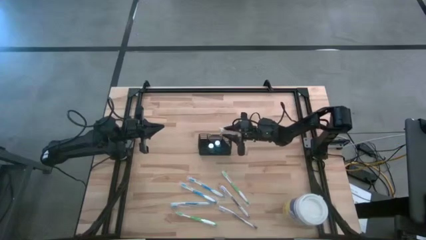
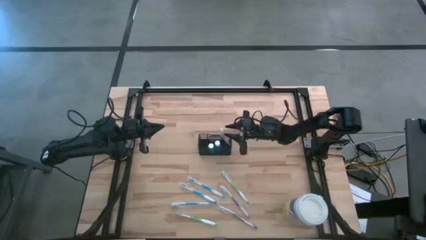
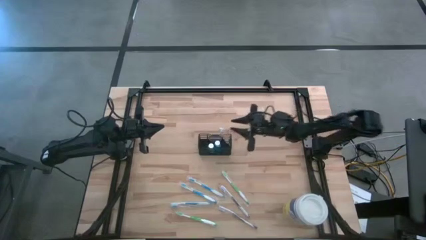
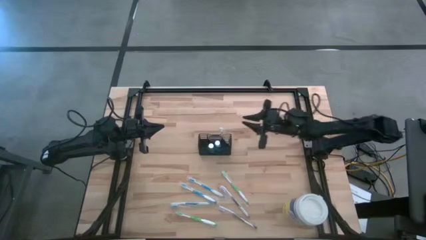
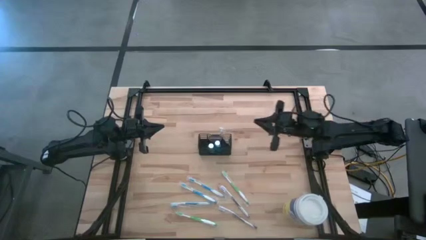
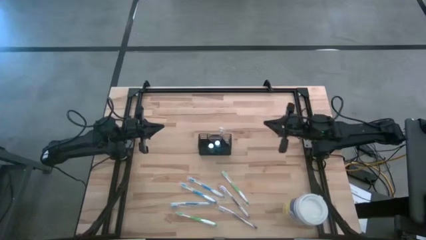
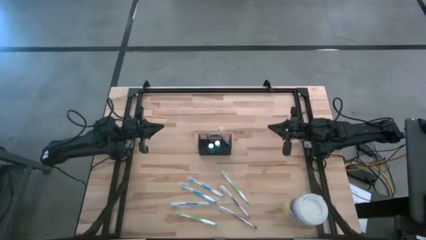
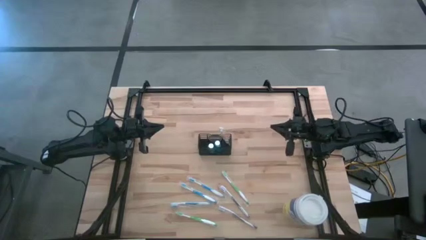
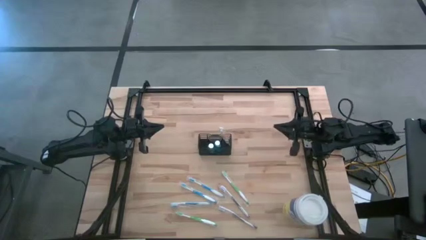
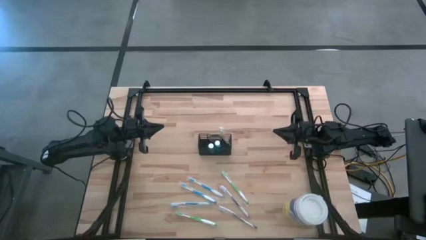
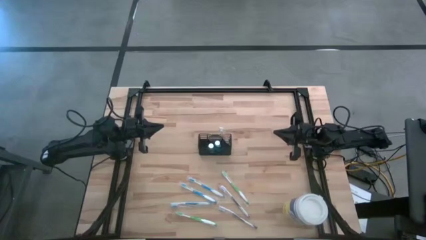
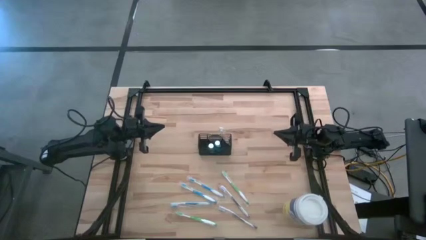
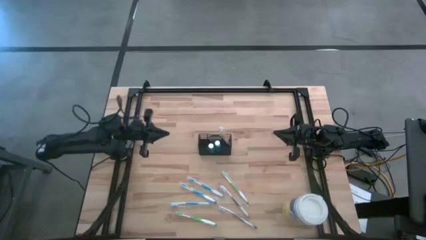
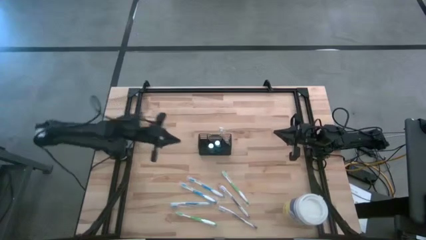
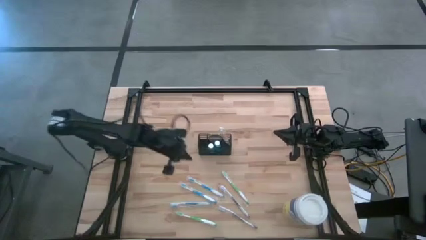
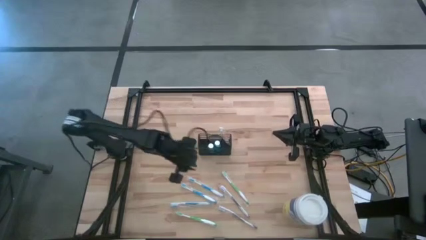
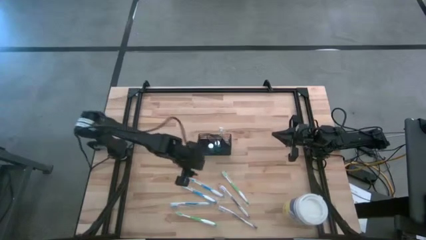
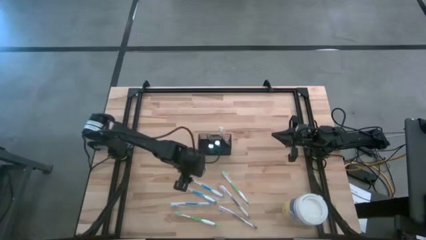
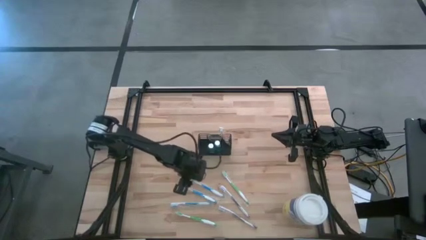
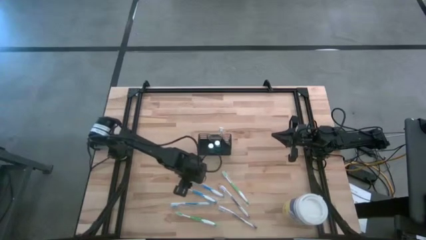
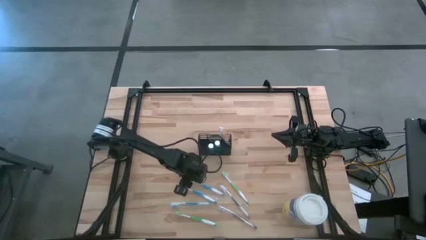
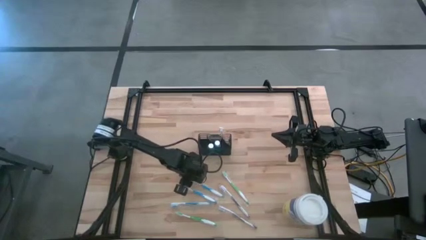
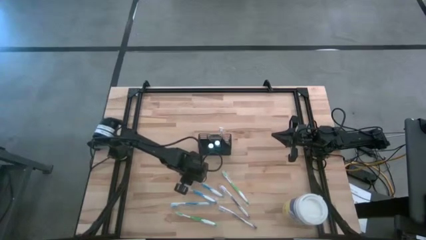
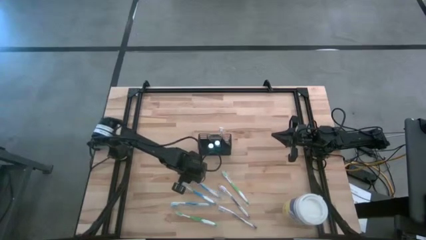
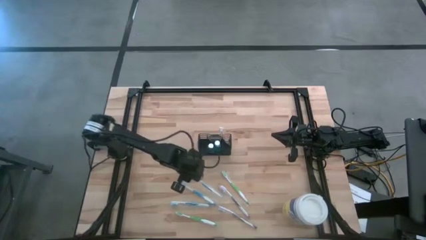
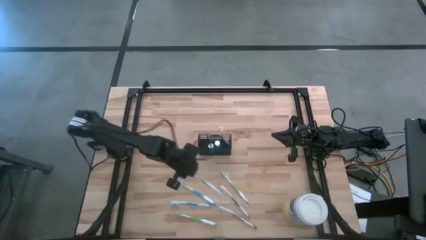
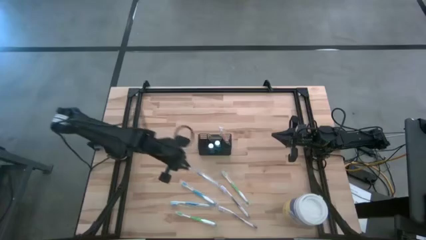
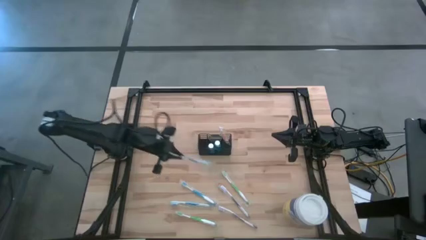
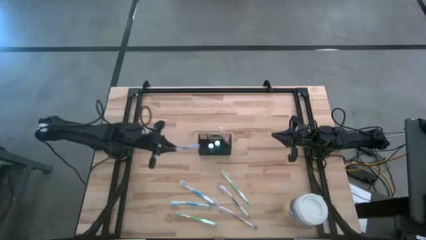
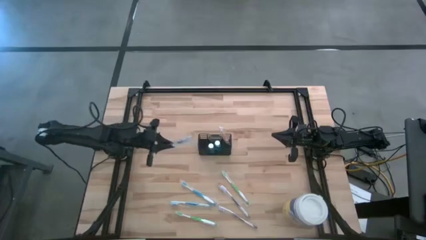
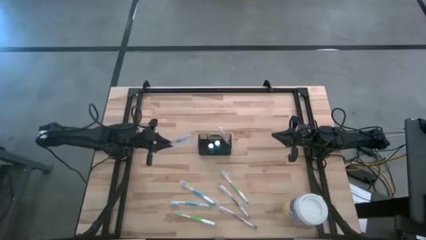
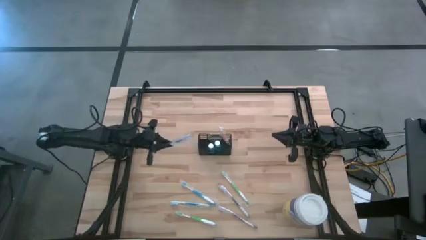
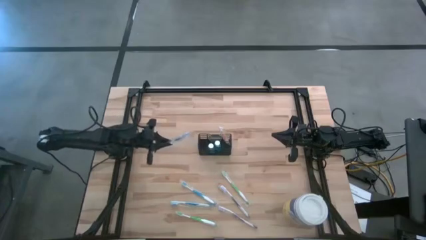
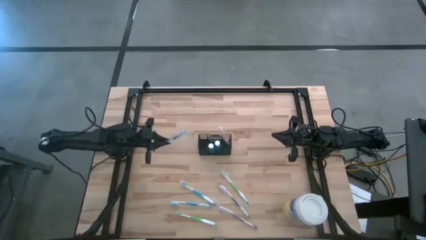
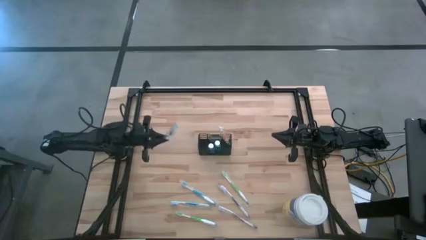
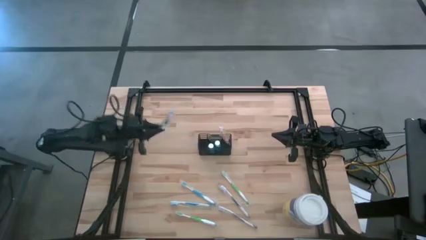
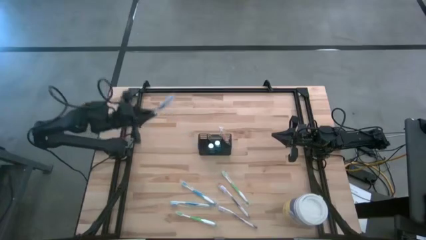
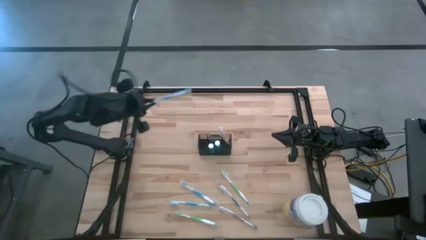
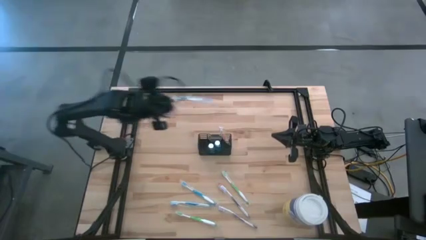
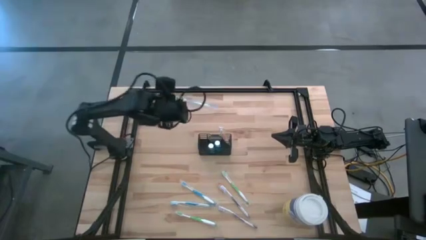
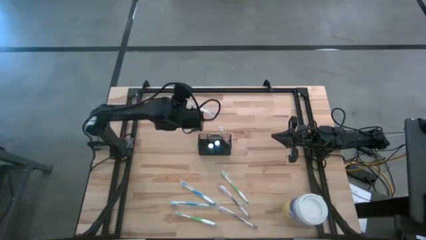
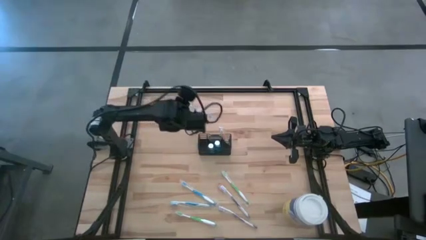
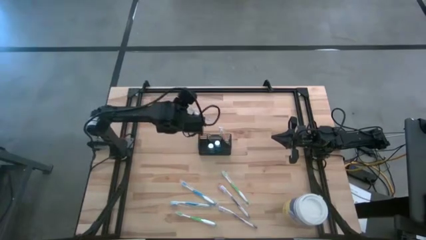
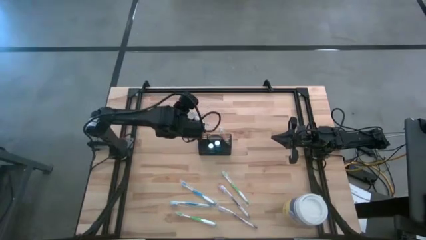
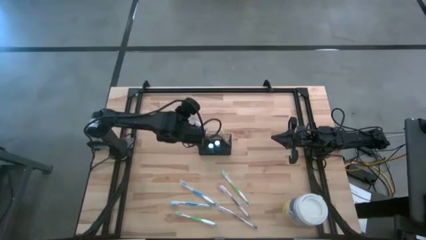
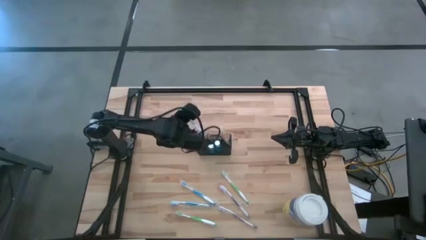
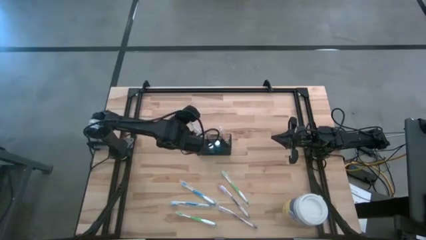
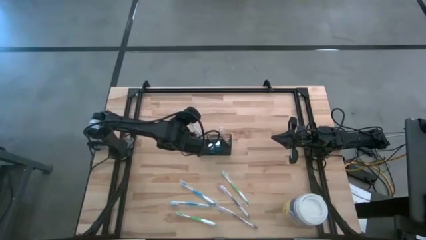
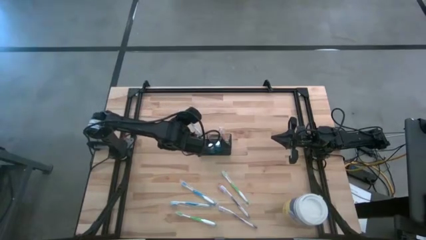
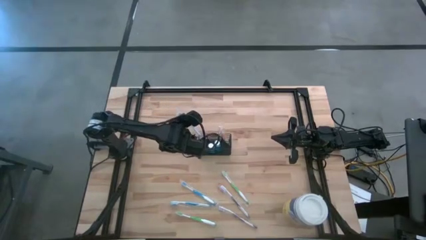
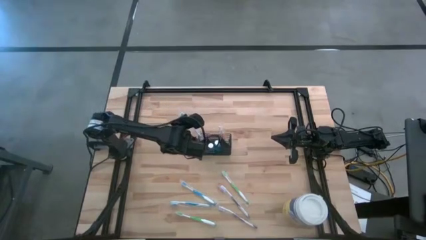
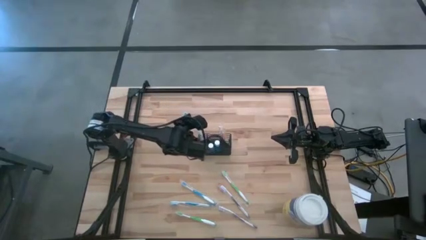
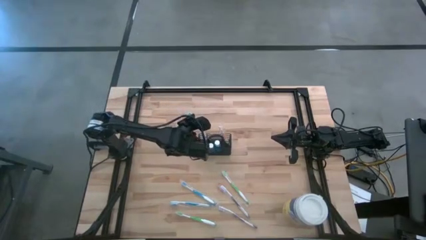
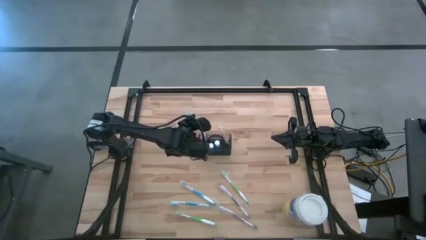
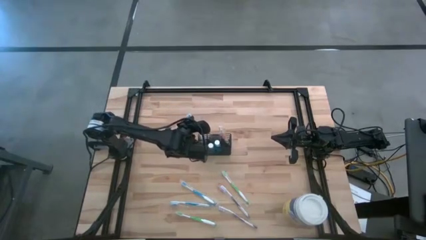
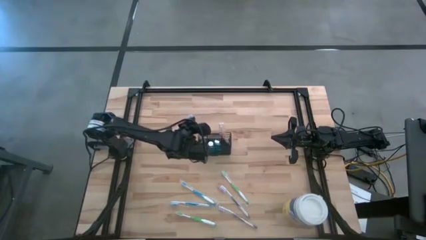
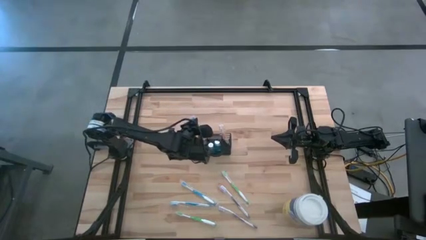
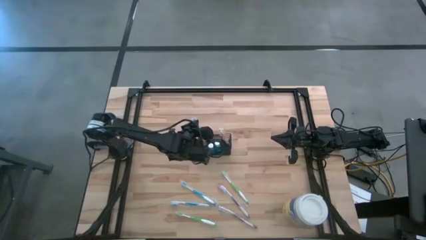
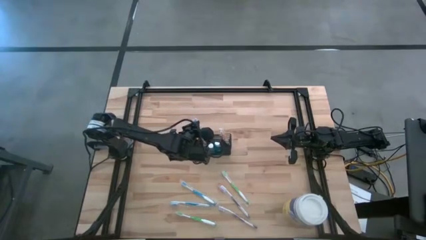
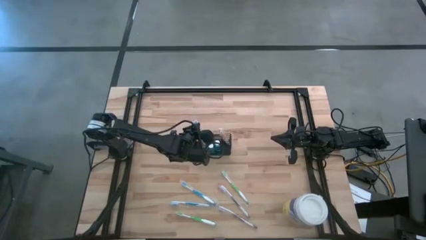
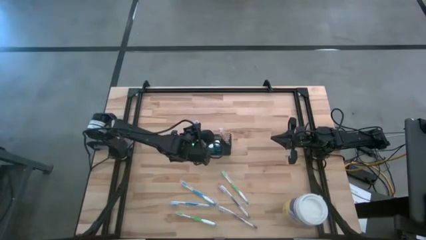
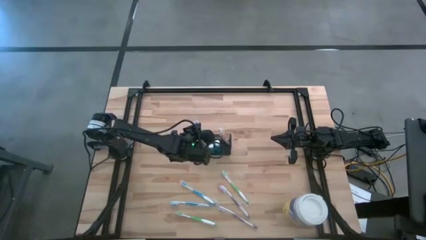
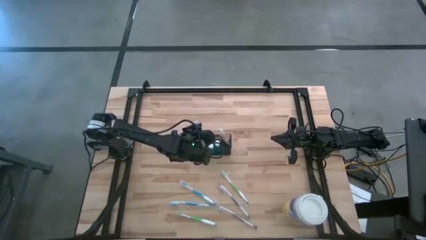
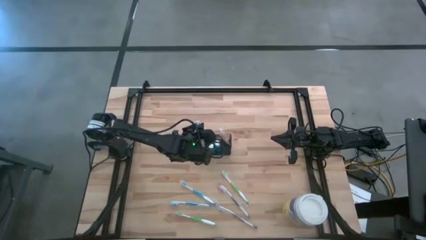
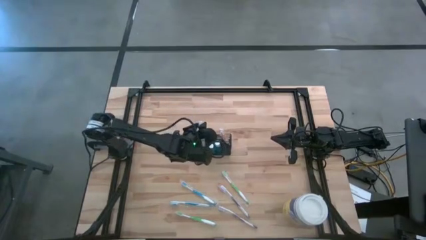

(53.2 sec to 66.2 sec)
Task: Pick & Place toothbrushing station
Put the top blue toothbrush into the black mesh organizer
